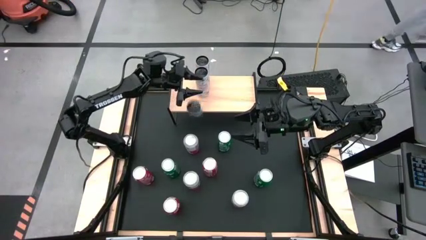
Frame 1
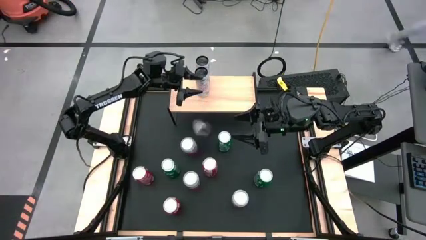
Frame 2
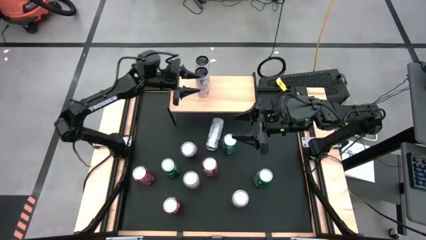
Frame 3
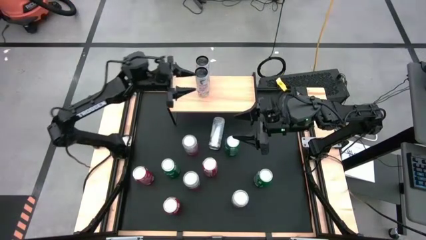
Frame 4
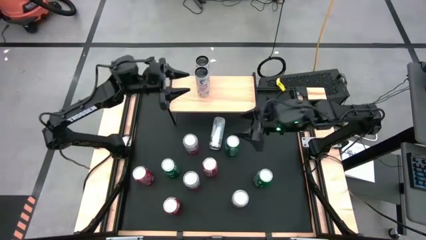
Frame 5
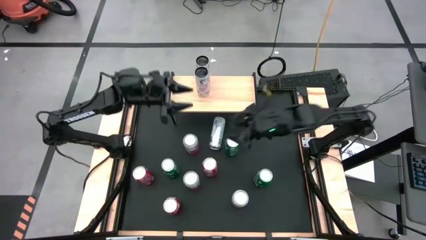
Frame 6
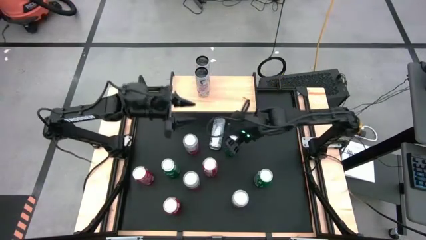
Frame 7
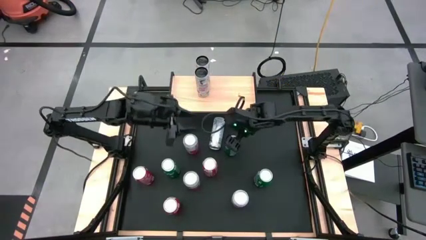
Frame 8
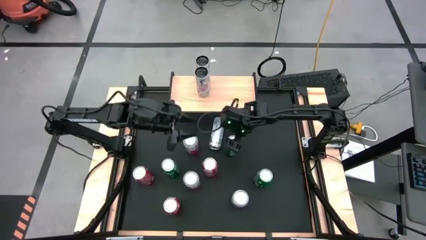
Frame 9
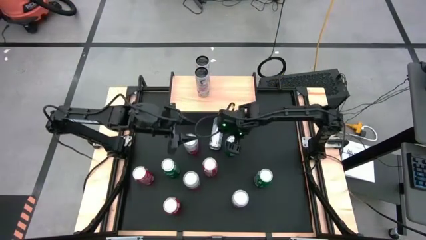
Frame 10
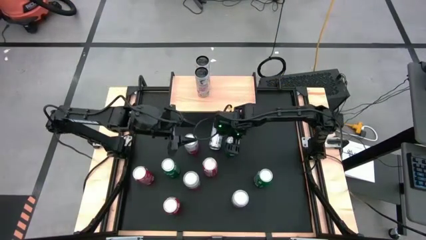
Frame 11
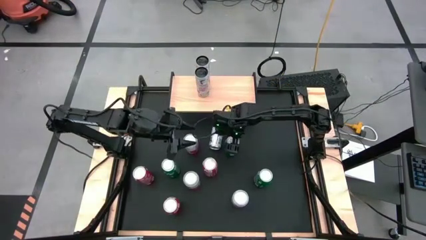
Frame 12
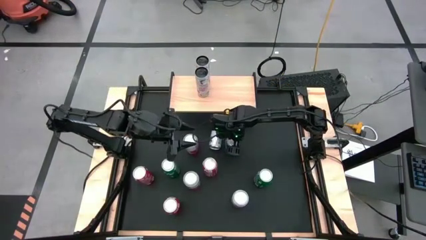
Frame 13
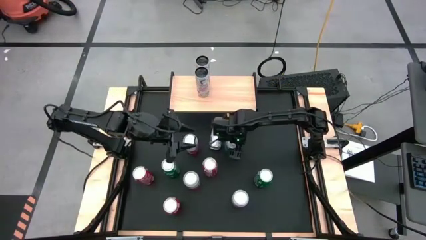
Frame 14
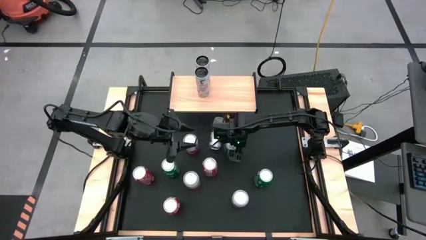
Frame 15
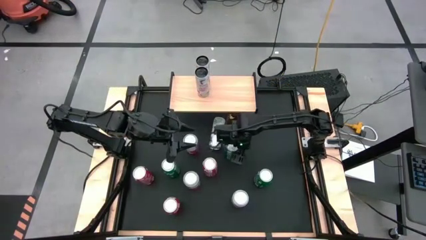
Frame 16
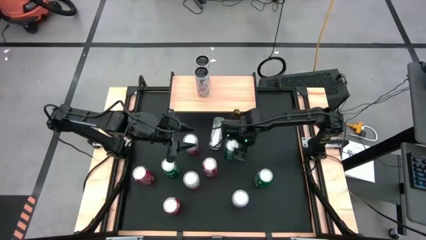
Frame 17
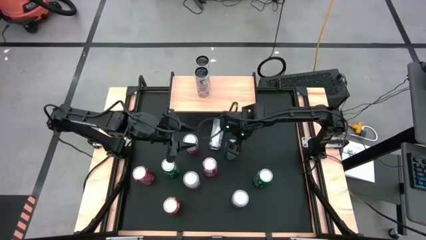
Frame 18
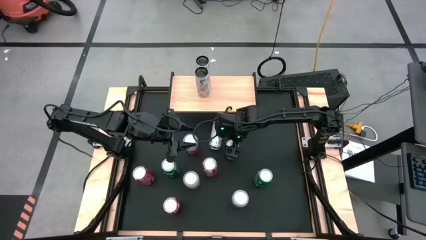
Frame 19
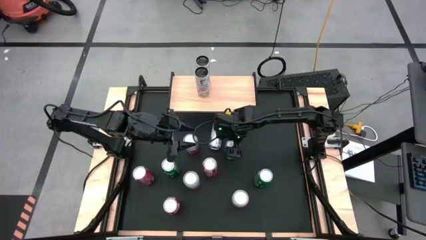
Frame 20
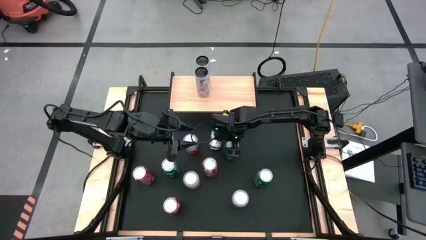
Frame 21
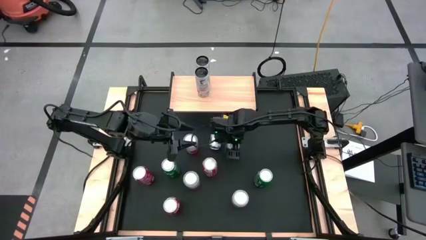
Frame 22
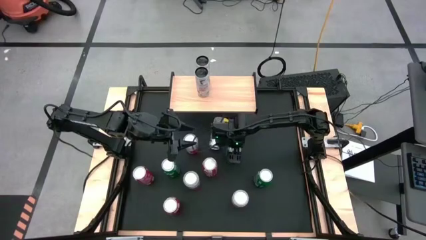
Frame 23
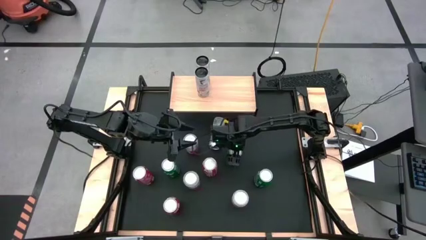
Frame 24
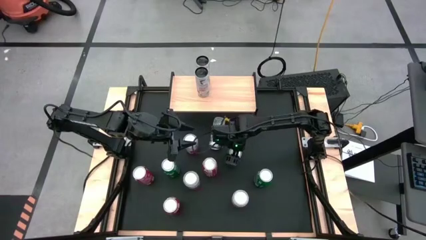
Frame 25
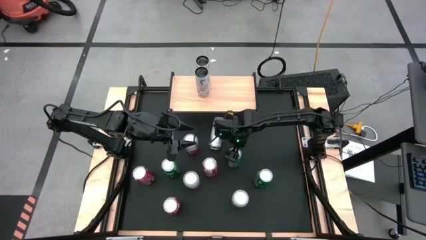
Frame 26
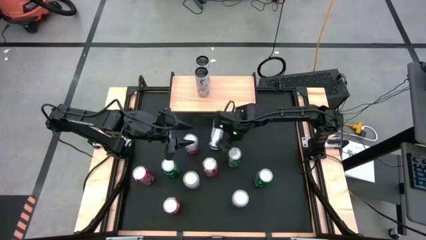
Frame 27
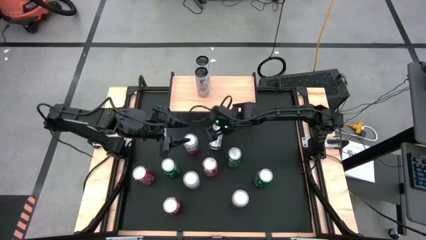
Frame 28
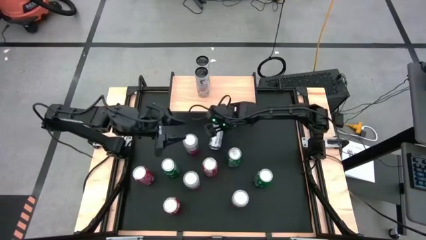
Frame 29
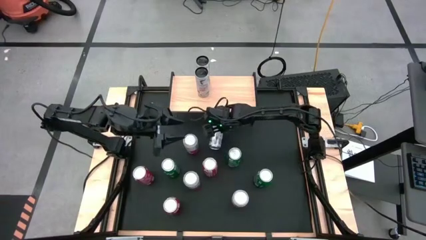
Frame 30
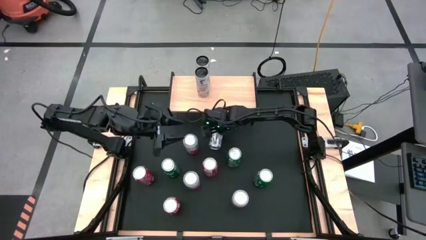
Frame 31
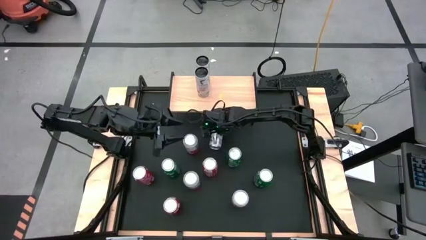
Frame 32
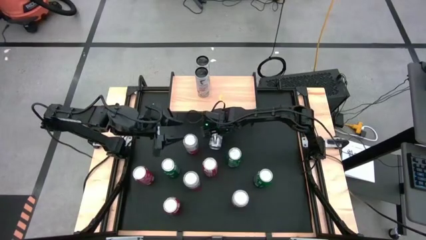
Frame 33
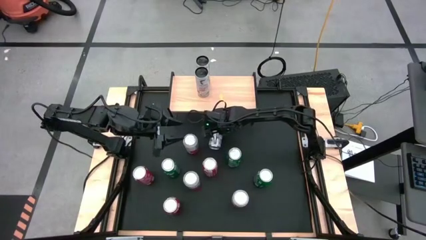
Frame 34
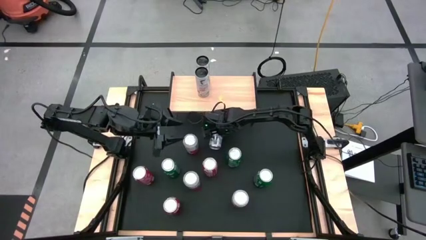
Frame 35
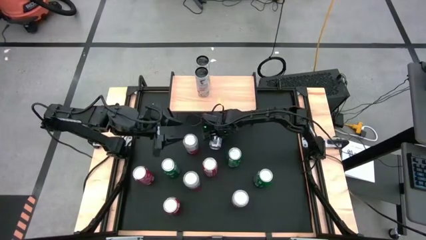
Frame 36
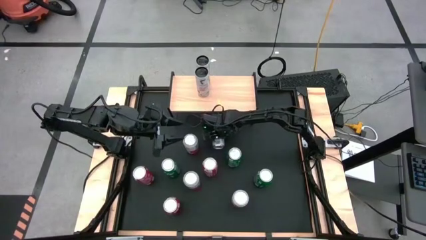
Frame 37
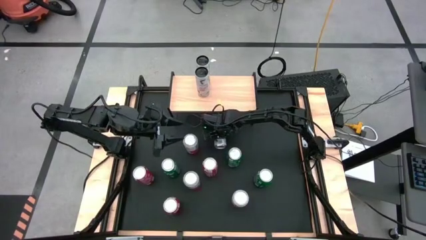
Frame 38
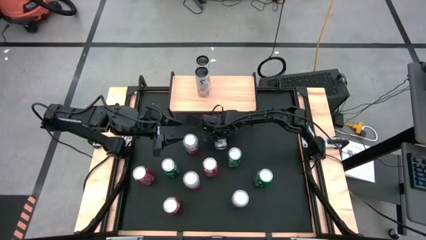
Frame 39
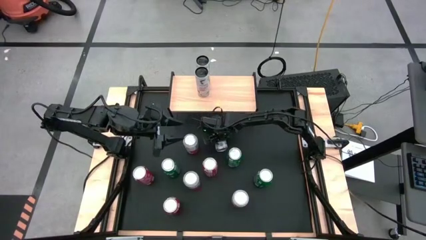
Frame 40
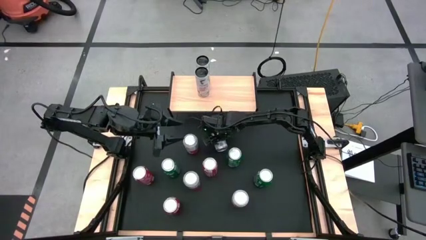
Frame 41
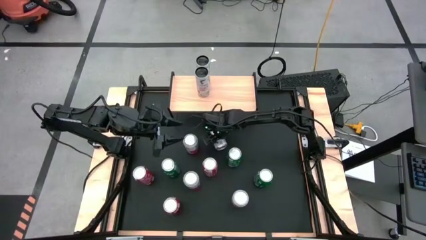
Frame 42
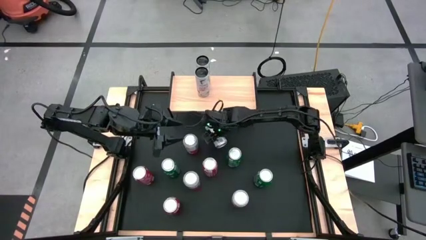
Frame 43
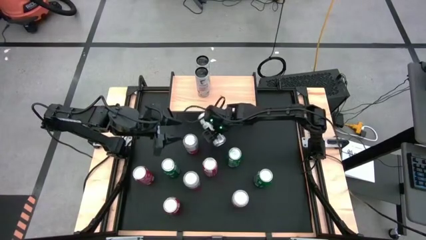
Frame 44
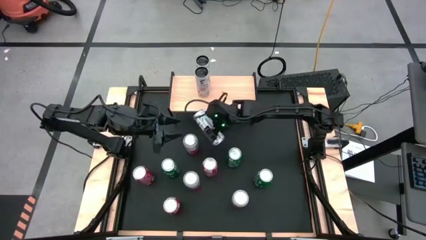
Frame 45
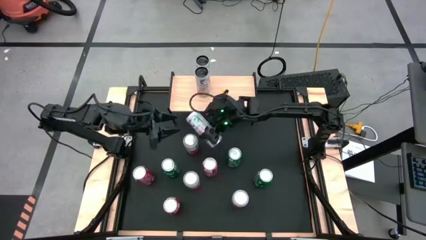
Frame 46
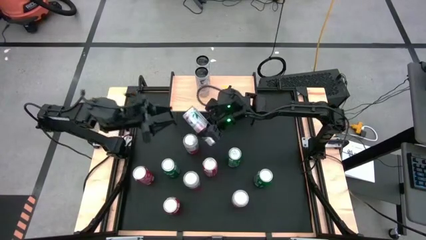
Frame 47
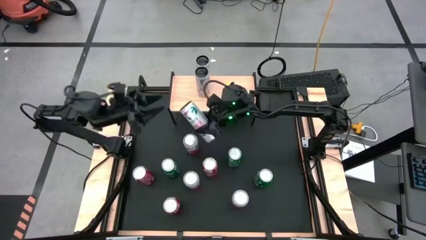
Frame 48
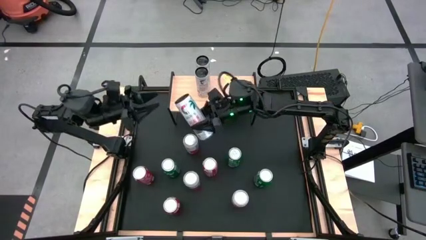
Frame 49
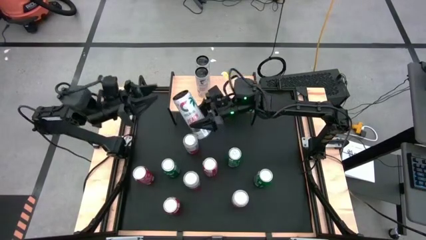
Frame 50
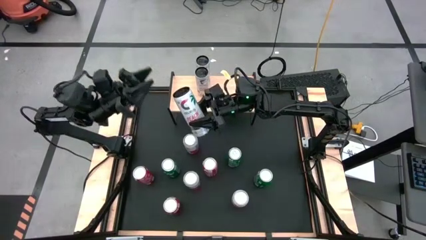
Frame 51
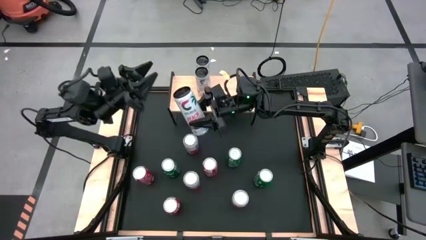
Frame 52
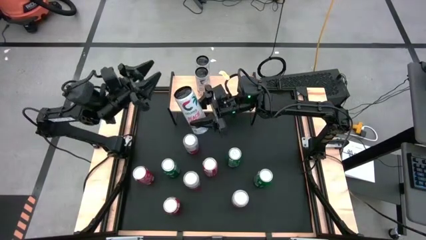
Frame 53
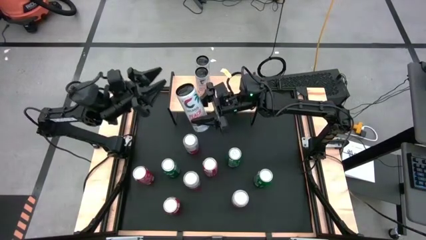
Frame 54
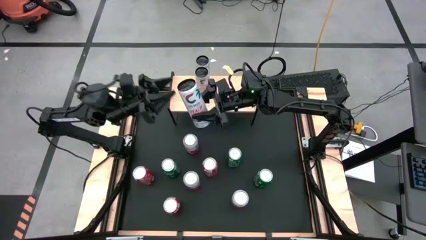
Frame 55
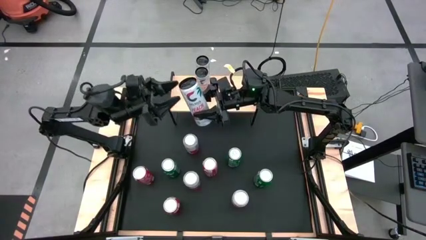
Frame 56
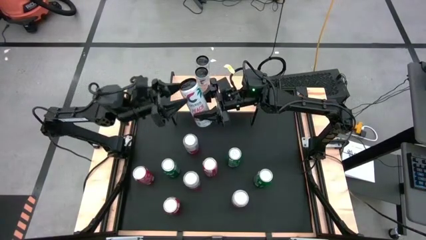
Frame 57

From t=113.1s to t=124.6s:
Task: Place canned beverage on shelf
Put the white pink soda can aligned with the other white pink soda can on the shelf
